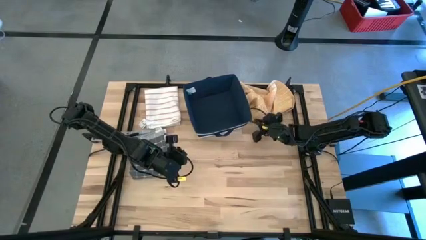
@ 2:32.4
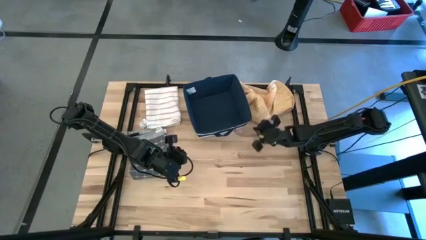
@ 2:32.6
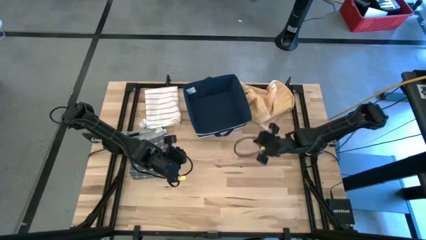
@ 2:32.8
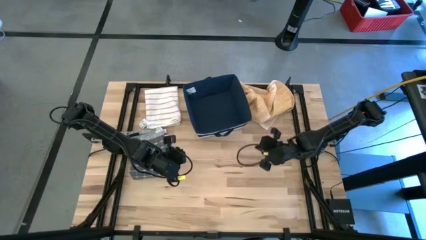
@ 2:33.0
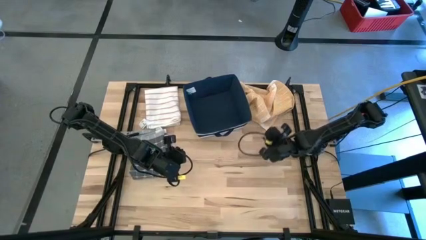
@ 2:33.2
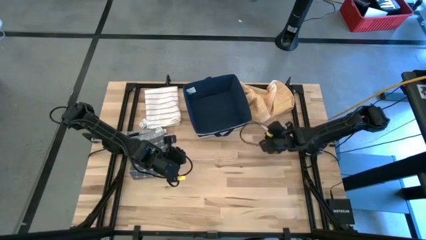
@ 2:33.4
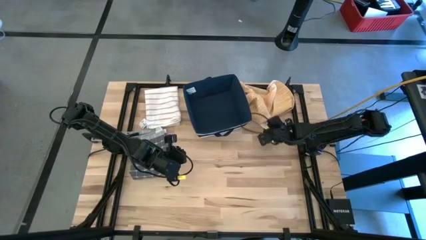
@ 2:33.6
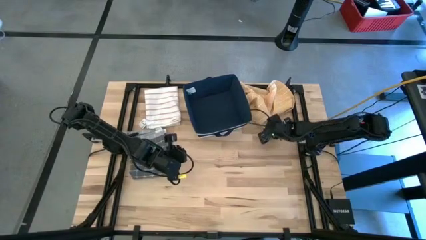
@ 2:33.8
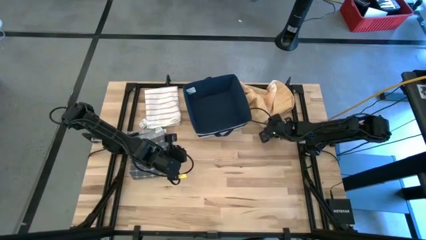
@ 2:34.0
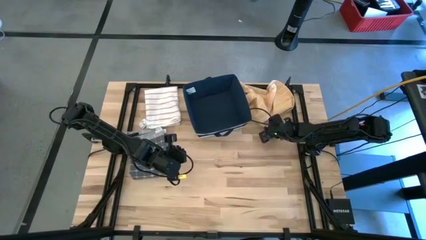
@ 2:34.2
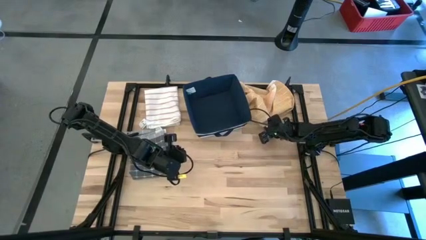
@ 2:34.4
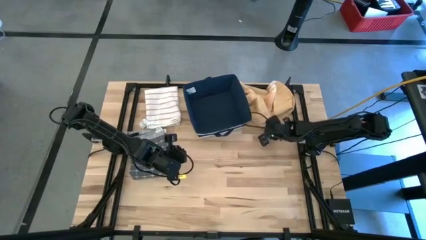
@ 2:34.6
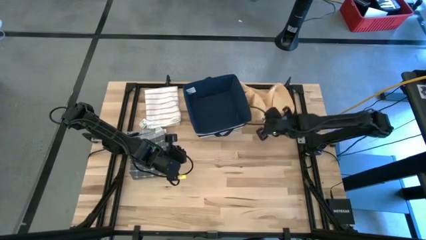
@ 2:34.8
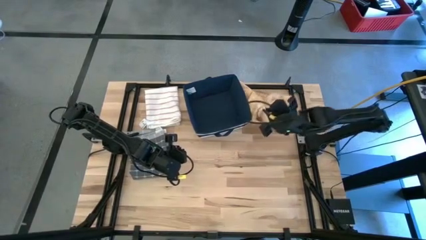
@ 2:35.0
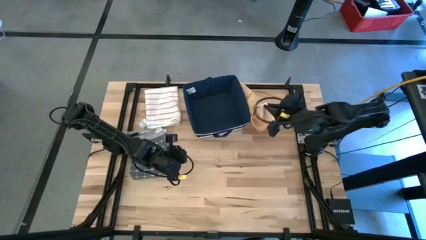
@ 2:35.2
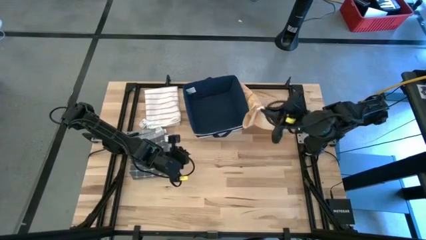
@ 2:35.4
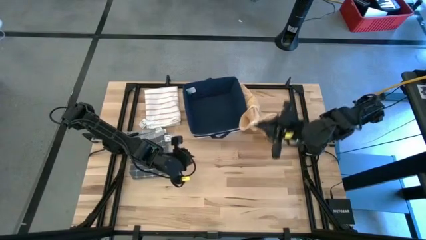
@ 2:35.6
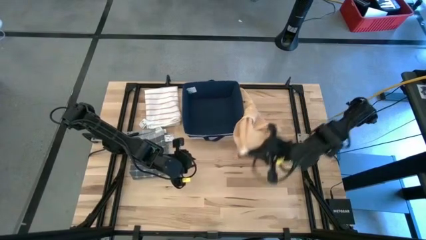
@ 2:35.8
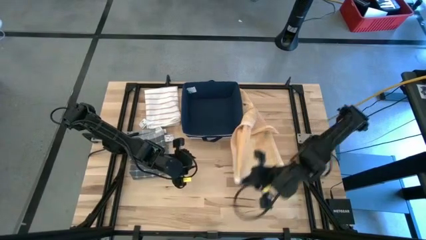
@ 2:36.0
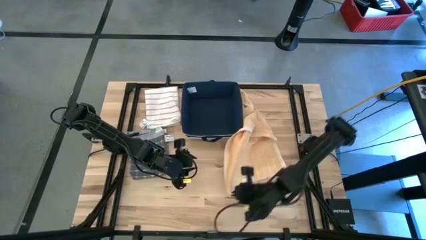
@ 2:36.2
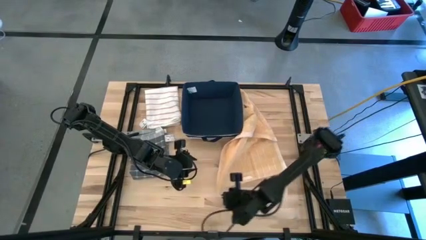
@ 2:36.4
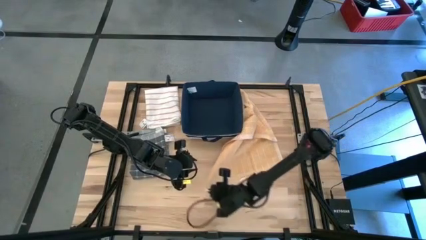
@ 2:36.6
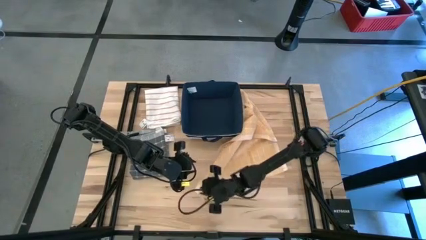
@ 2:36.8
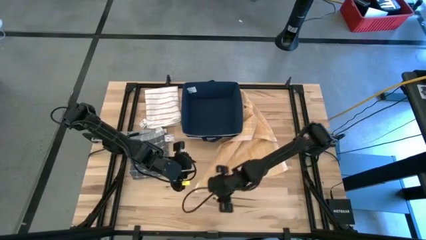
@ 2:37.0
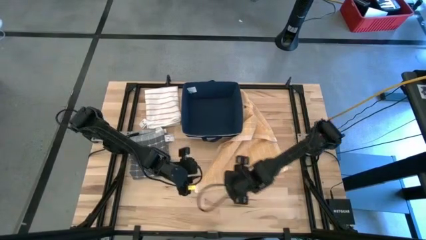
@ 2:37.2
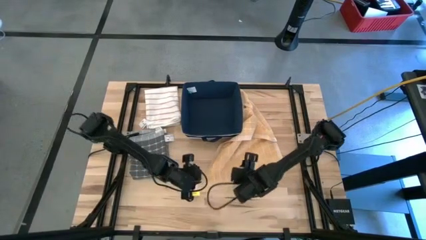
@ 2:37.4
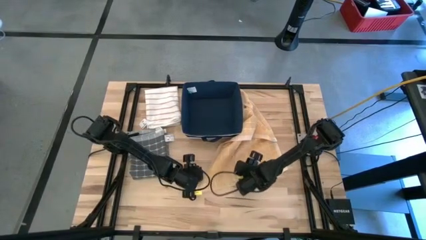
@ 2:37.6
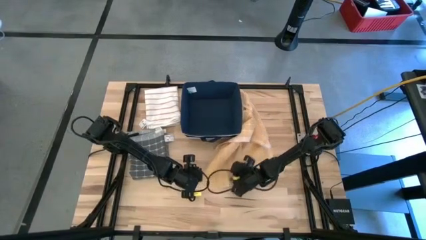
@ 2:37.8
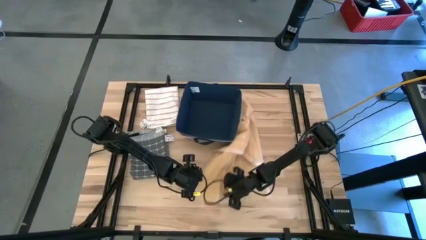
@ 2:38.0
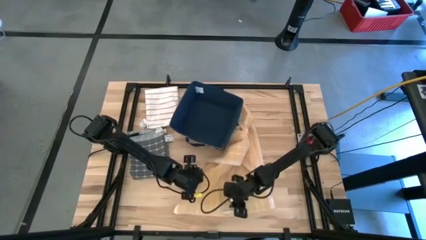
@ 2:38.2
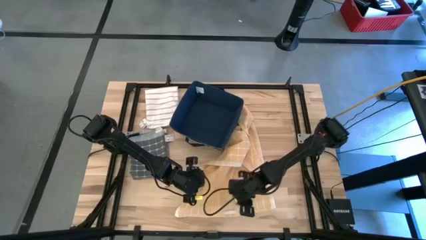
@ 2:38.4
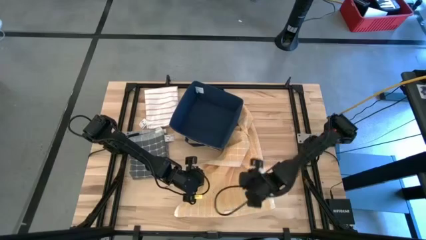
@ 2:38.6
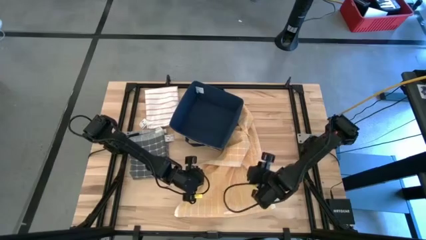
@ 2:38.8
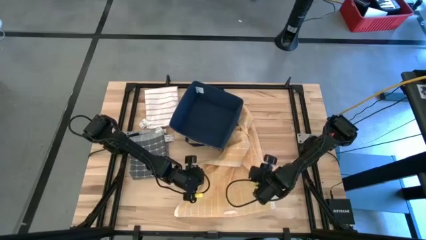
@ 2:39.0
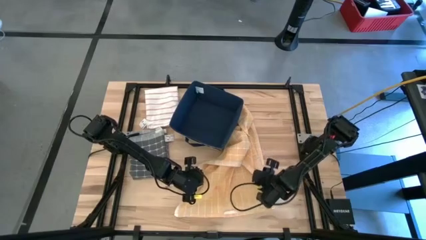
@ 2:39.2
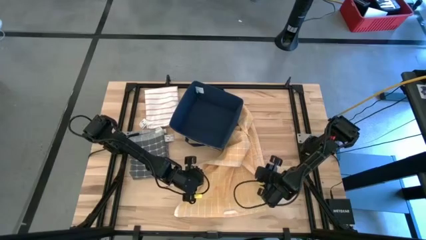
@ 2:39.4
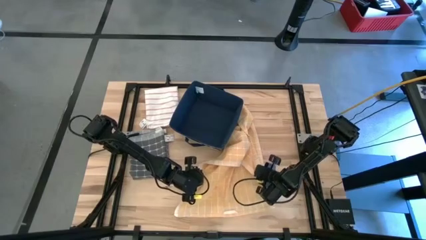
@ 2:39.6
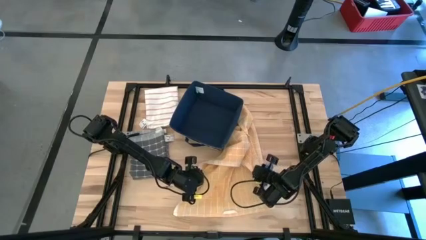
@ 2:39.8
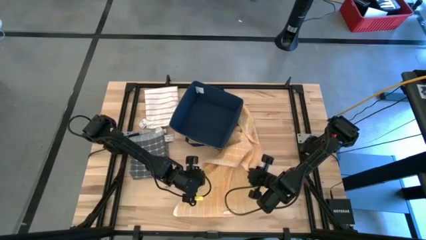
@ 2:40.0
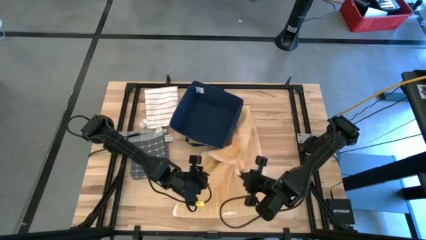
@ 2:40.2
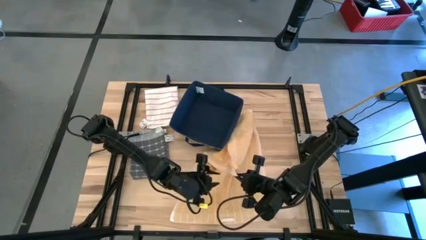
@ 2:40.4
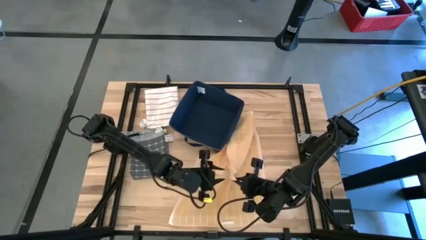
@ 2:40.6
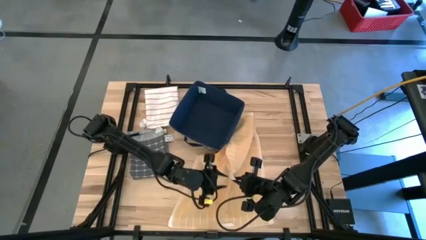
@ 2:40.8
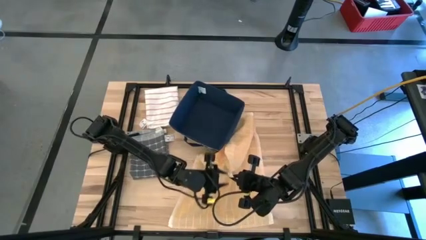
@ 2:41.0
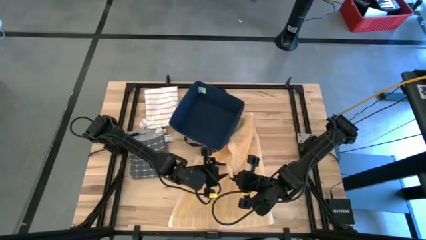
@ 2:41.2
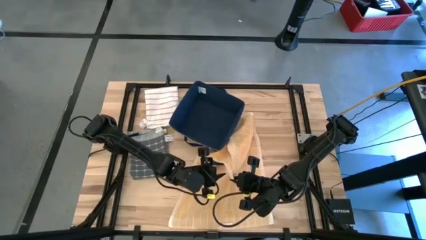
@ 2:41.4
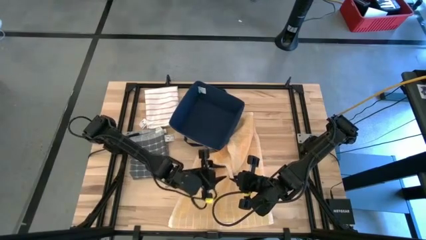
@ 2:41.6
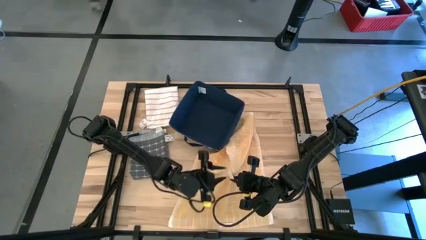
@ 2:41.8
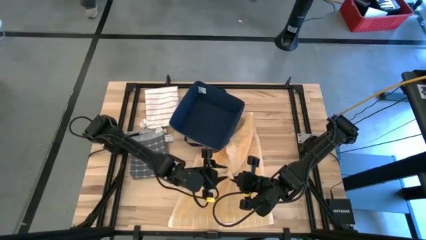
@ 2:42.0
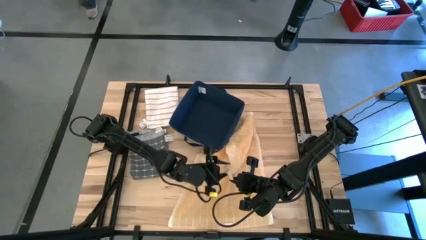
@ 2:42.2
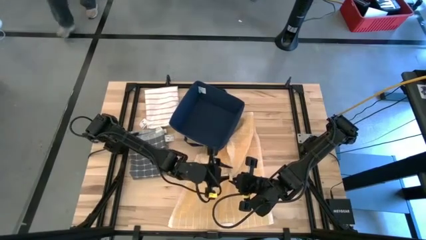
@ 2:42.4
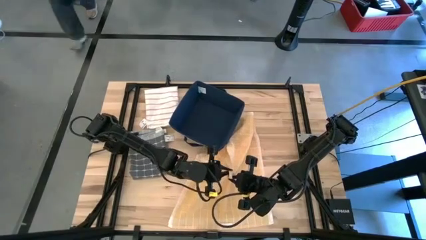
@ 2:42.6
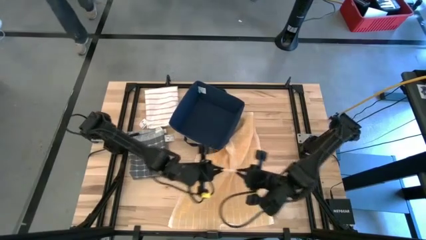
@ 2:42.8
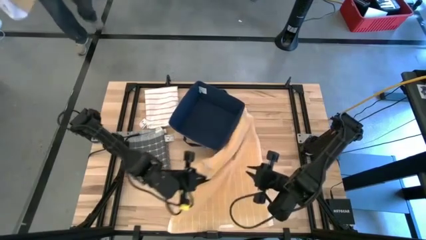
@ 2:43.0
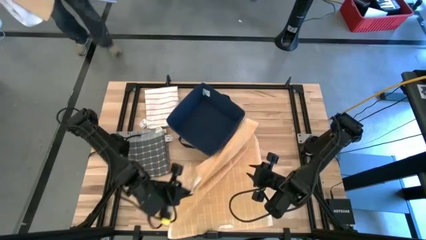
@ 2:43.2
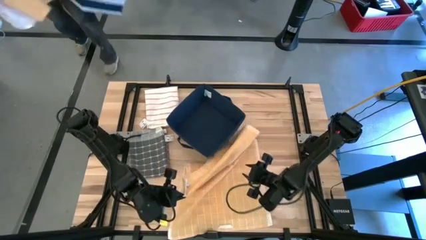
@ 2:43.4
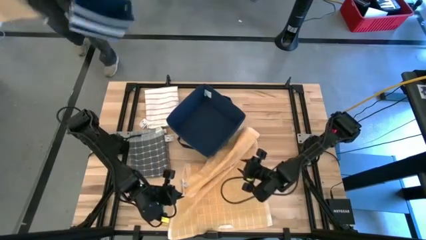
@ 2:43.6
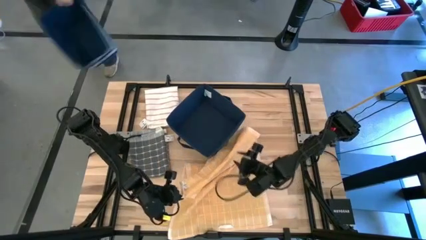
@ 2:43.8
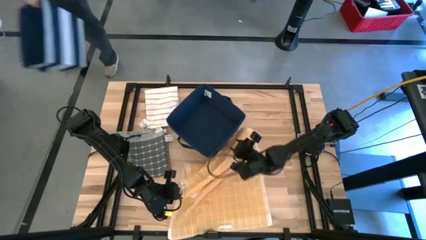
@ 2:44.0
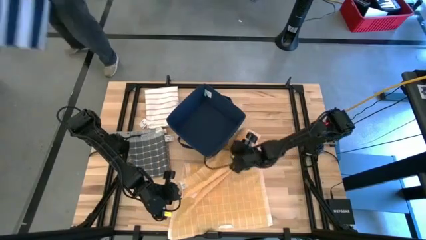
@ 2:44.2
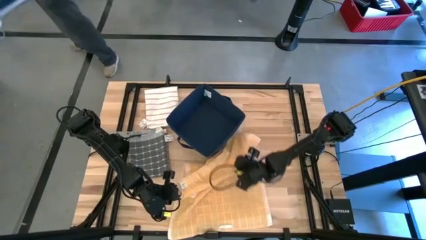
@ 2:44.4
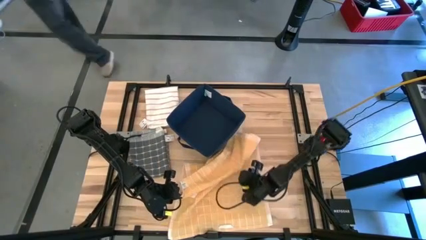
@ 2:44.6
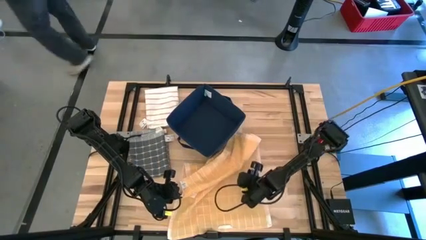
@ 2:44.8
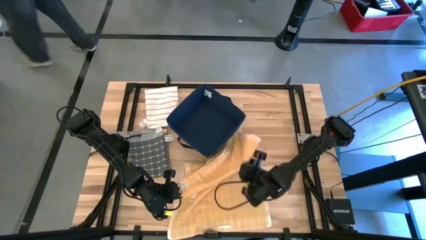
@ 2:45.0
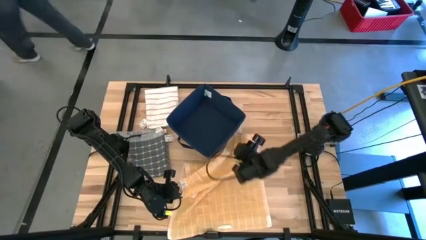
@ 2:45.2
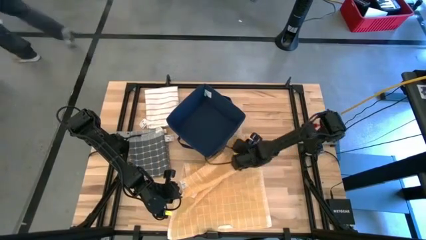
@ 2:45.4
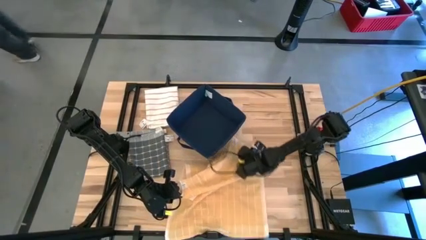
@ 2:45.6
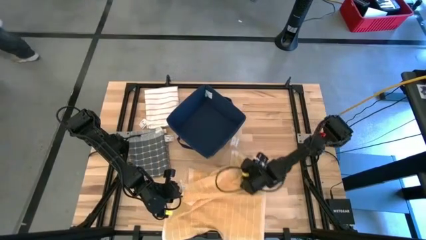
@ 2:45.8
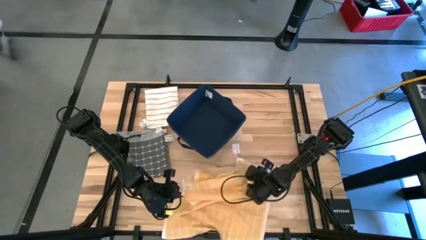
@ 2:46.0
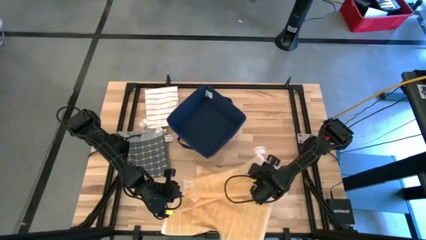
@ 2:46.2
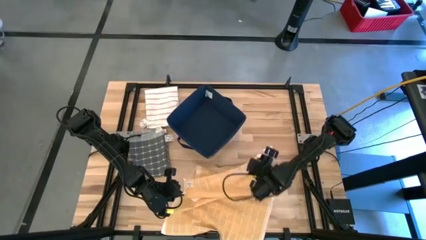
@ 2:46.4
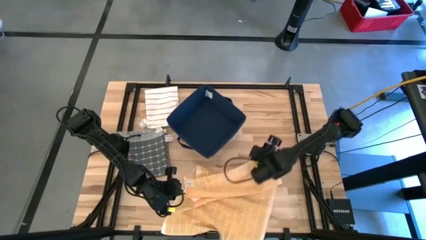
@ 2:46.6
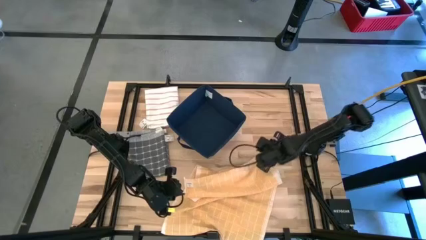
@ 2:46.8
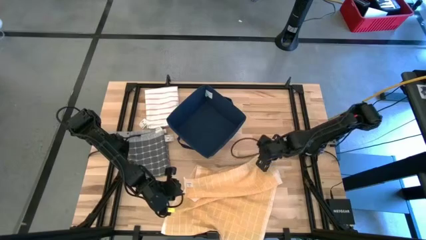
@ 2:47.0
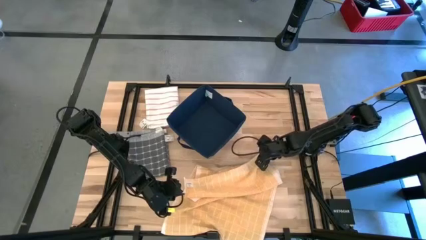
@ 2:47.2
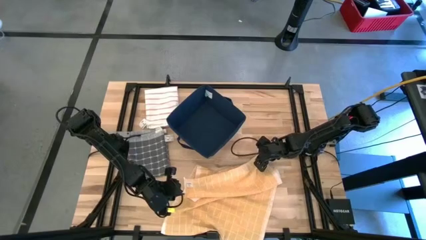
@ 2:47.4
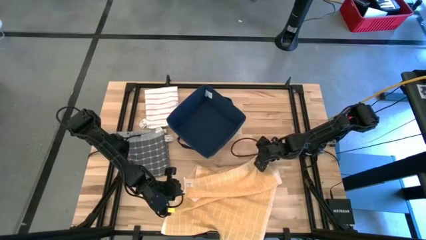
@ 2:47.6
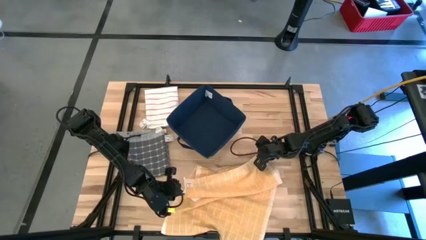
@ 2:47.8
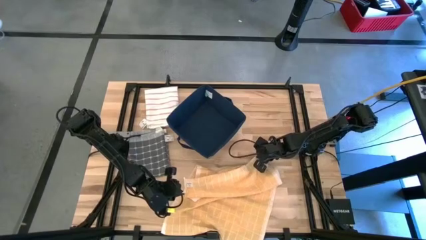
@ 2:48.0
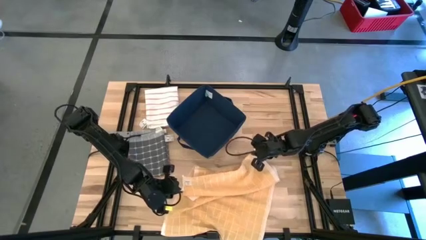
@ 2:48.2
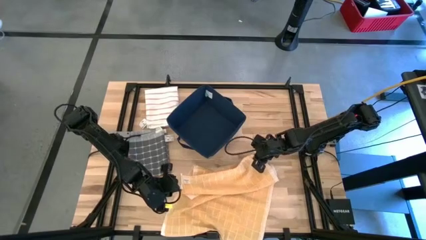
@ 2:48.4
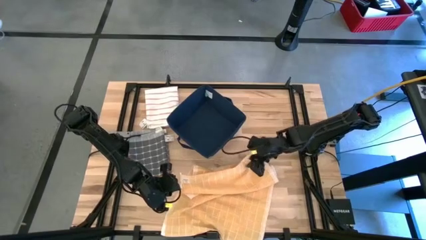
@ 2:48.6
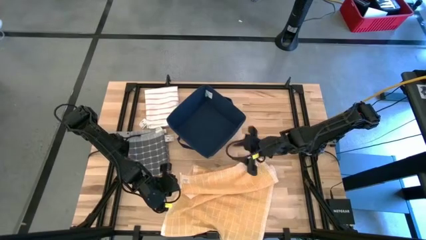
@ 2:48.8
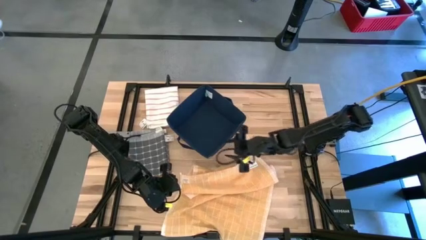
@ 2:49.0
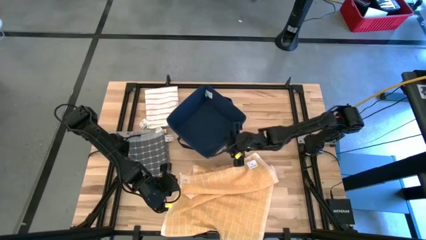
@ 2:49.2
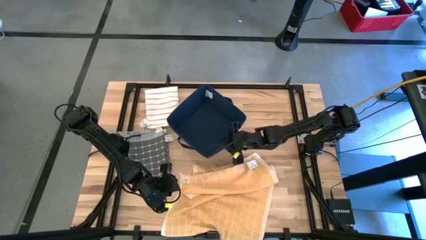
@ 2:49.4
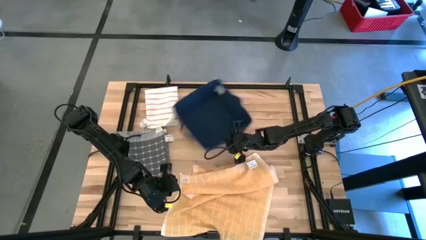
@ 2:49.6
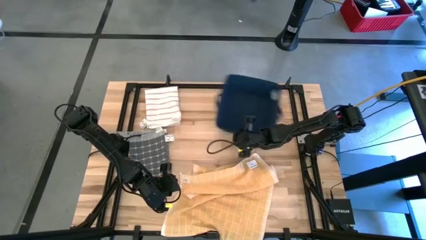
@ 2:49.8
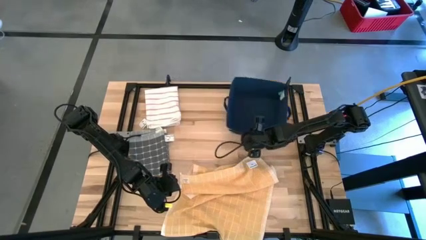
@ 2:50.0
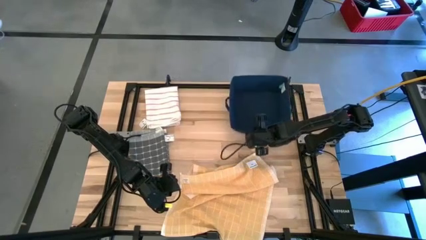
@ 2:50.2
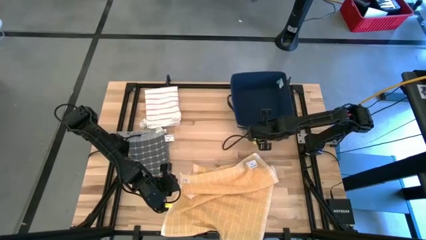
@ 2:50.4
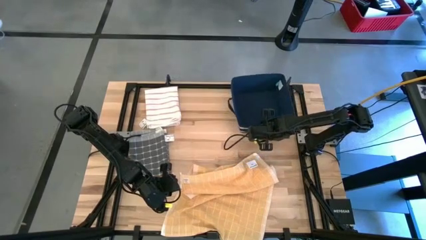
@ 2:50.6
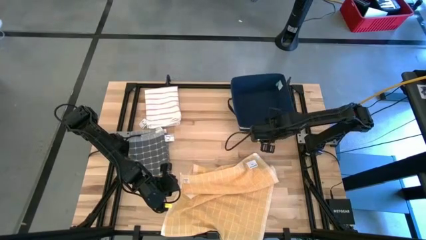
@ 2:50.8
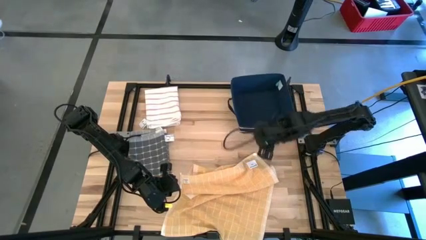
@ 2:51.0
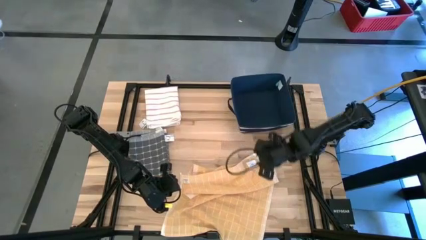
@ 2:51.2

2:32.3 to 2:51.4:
Task: Fold towel
Fold the orange towel
